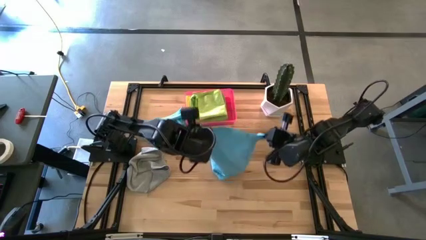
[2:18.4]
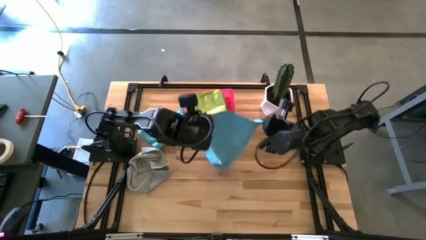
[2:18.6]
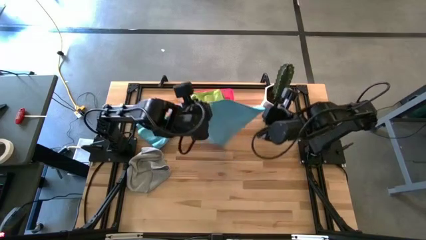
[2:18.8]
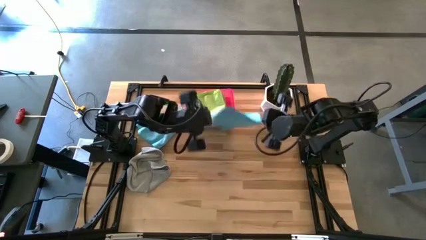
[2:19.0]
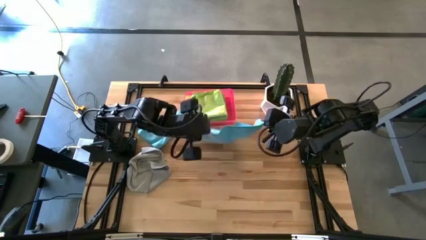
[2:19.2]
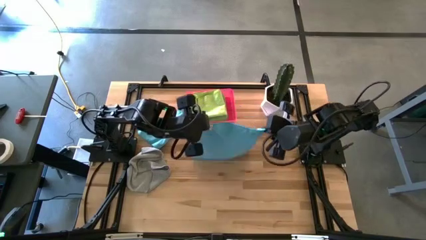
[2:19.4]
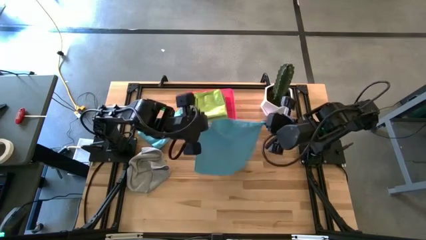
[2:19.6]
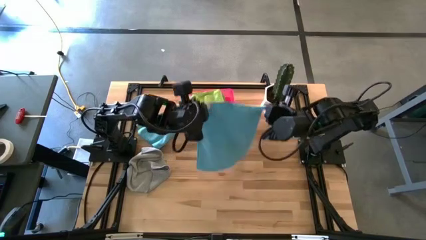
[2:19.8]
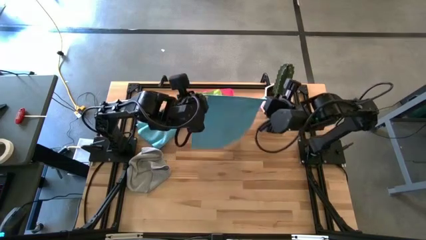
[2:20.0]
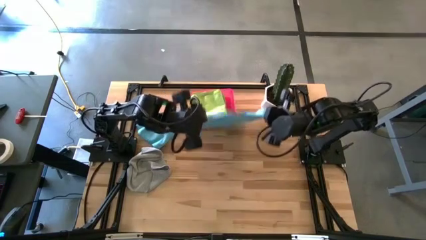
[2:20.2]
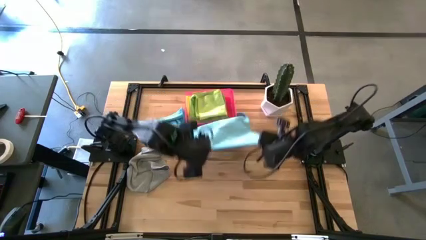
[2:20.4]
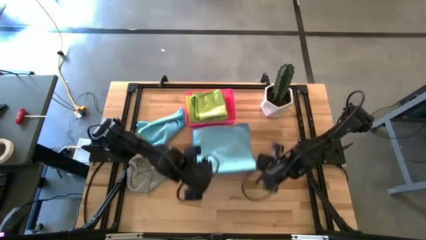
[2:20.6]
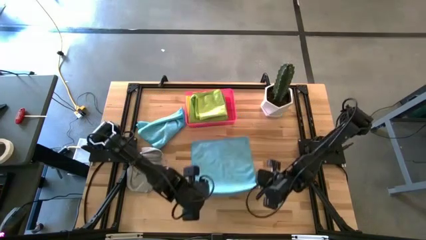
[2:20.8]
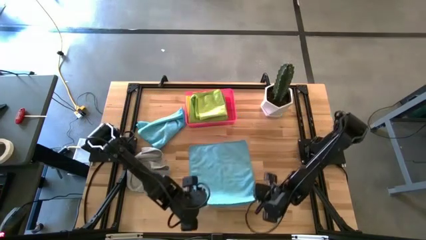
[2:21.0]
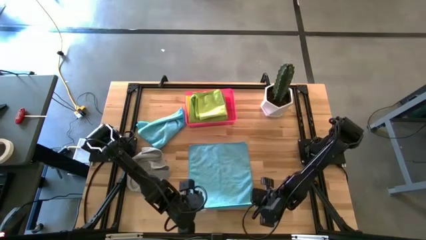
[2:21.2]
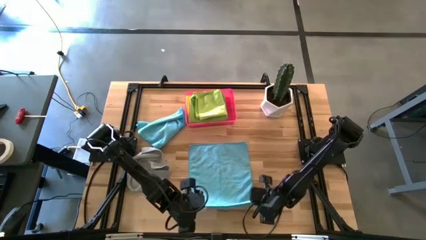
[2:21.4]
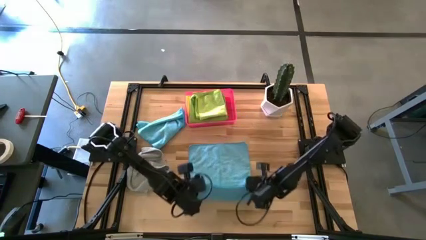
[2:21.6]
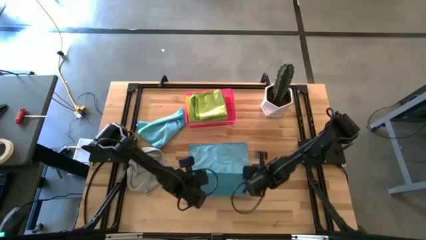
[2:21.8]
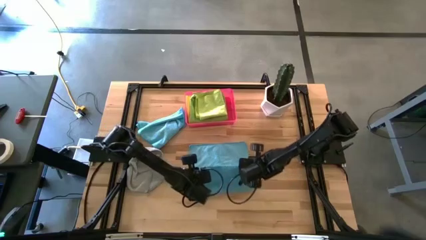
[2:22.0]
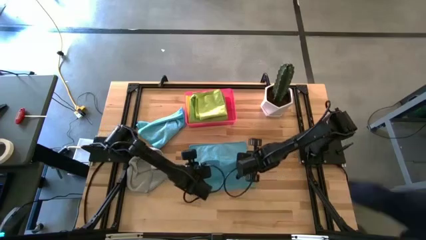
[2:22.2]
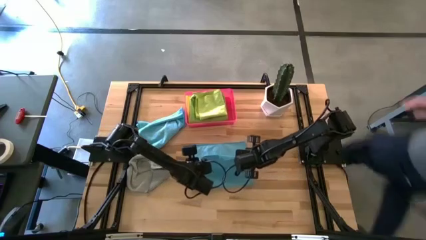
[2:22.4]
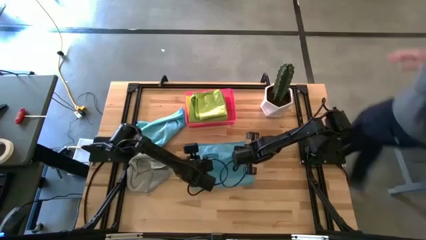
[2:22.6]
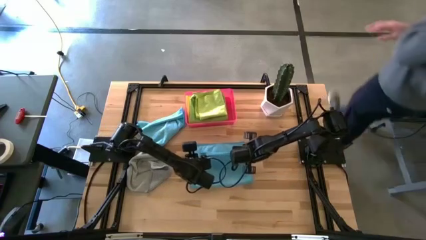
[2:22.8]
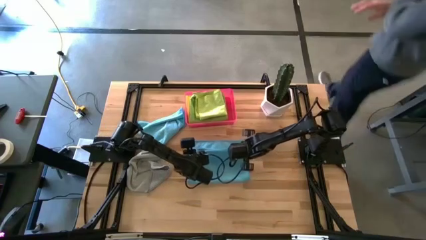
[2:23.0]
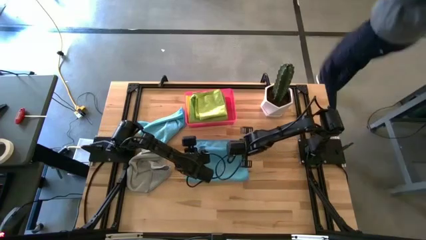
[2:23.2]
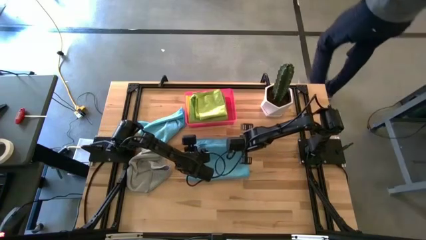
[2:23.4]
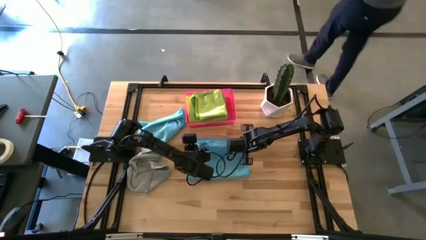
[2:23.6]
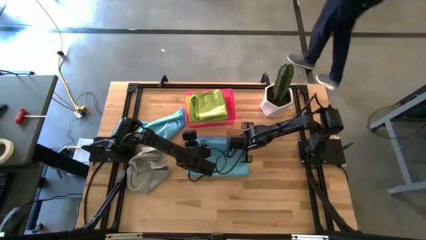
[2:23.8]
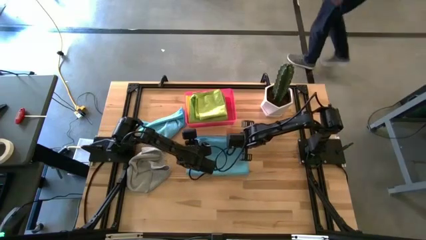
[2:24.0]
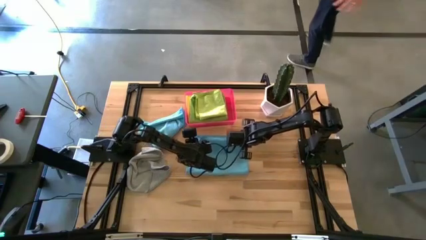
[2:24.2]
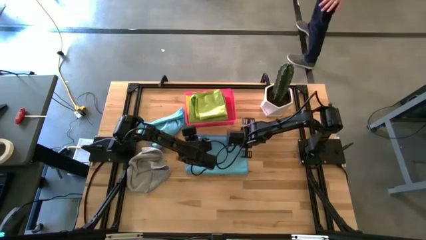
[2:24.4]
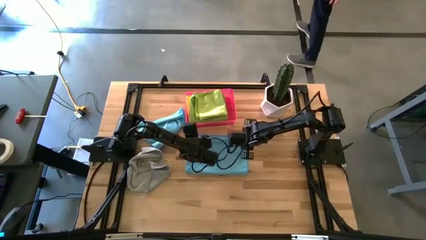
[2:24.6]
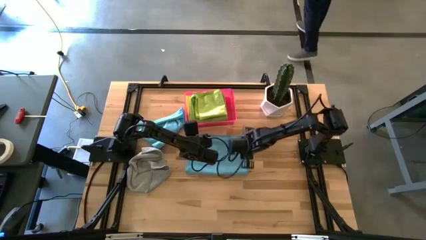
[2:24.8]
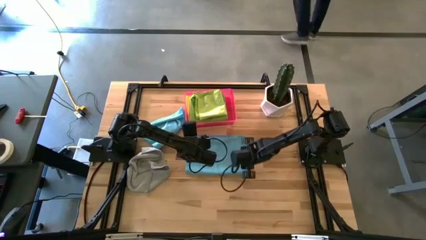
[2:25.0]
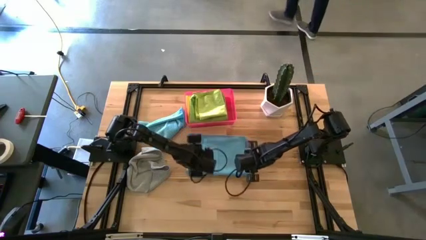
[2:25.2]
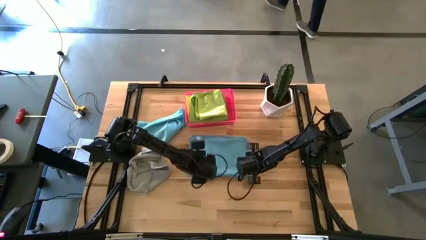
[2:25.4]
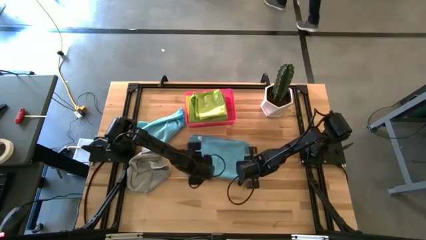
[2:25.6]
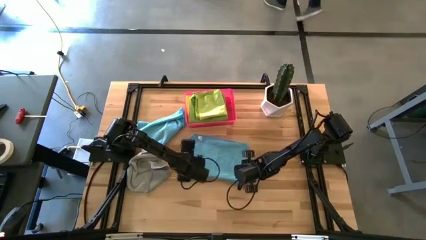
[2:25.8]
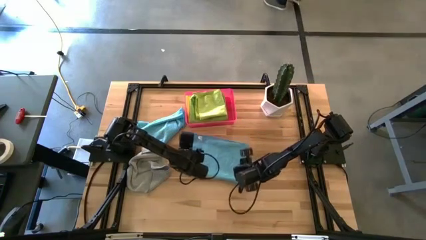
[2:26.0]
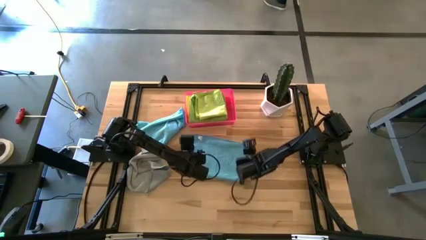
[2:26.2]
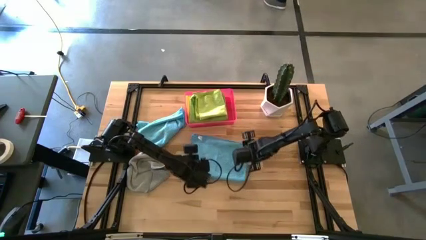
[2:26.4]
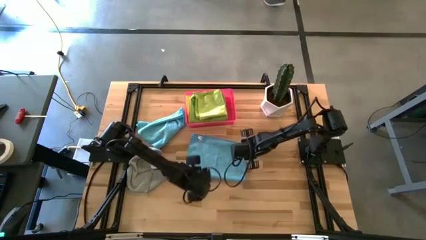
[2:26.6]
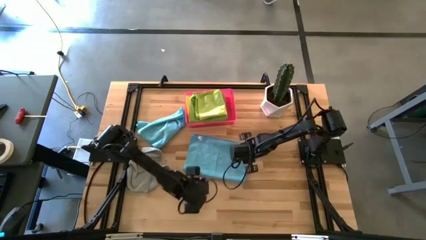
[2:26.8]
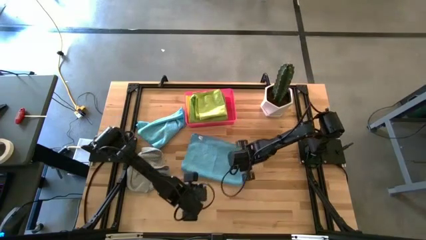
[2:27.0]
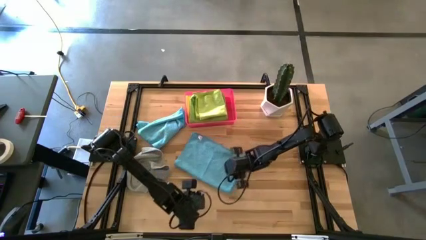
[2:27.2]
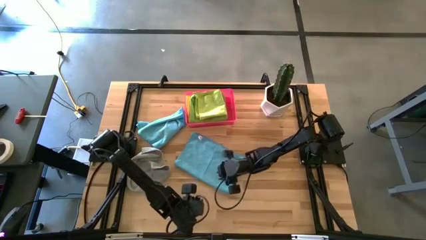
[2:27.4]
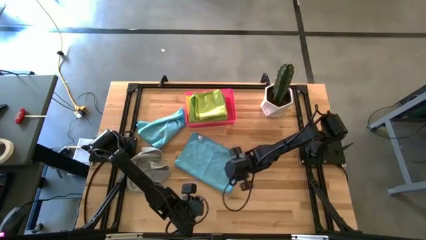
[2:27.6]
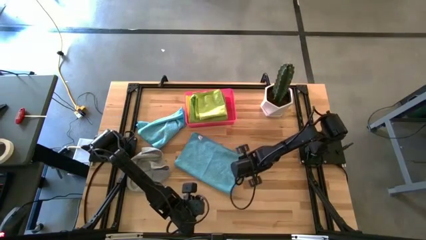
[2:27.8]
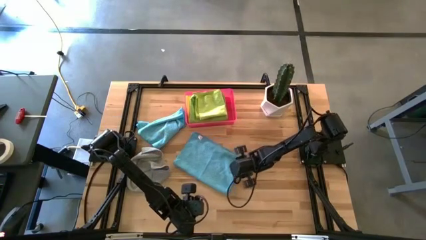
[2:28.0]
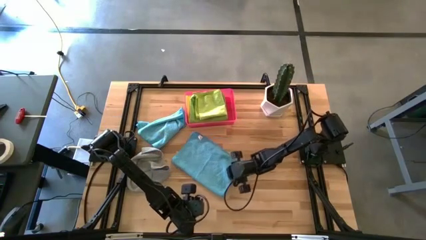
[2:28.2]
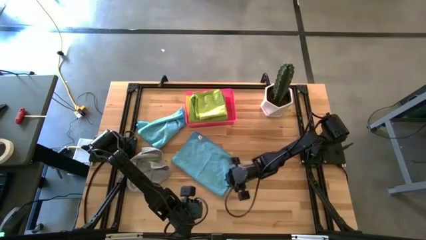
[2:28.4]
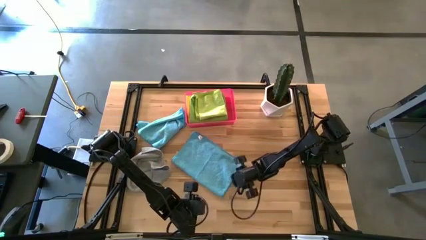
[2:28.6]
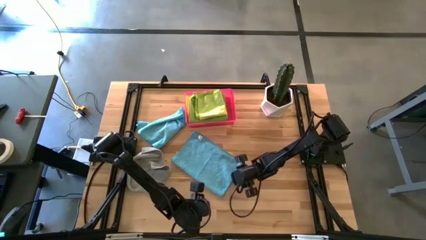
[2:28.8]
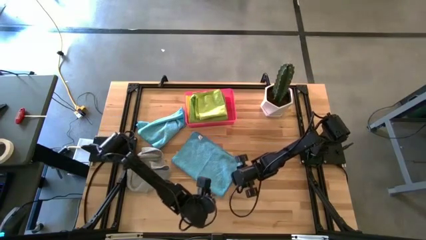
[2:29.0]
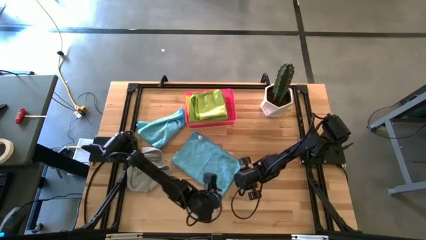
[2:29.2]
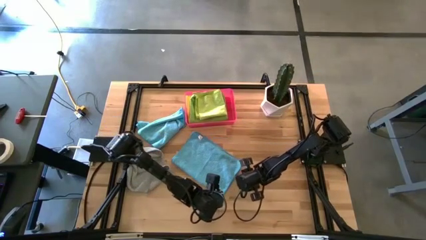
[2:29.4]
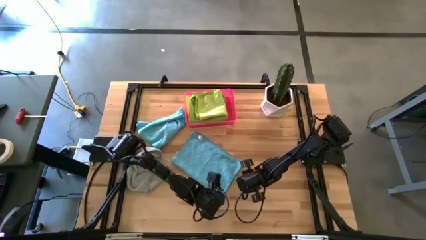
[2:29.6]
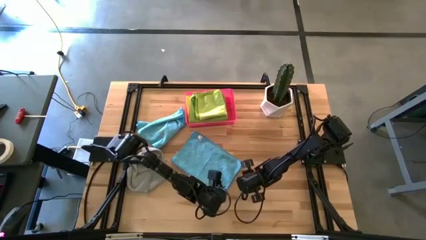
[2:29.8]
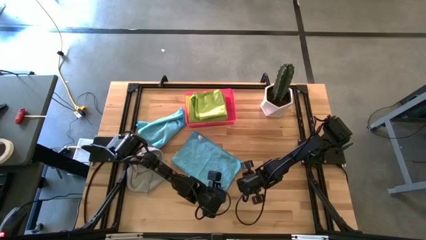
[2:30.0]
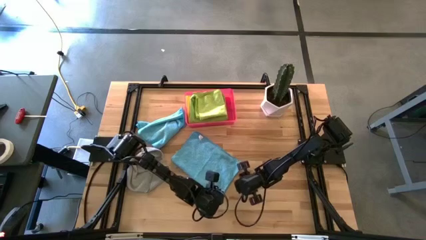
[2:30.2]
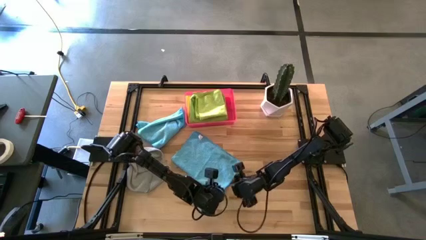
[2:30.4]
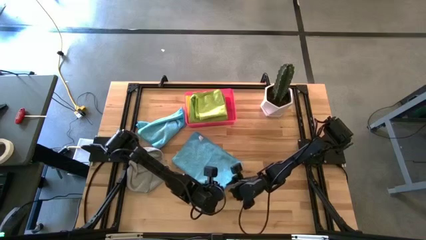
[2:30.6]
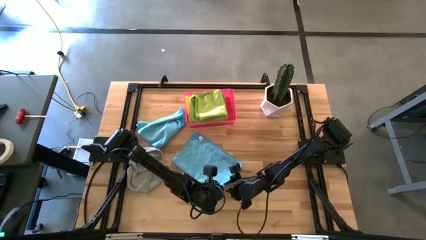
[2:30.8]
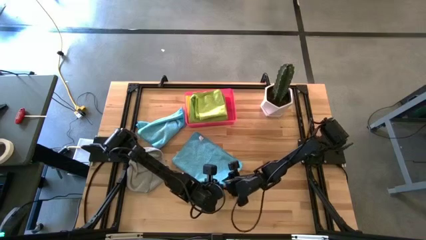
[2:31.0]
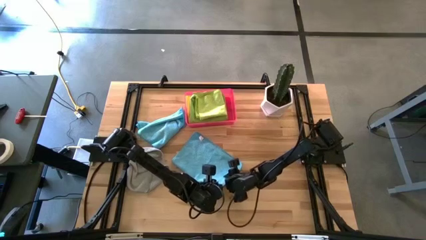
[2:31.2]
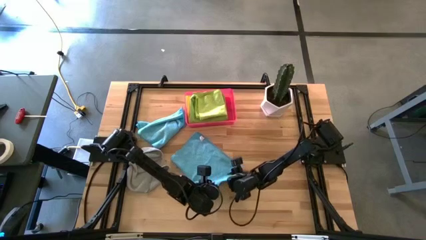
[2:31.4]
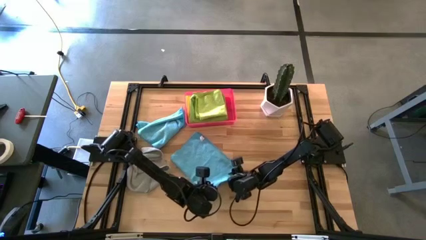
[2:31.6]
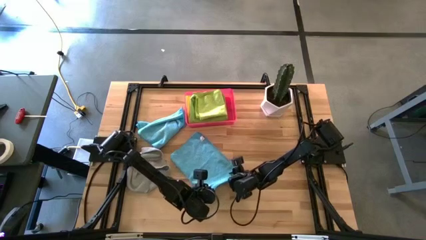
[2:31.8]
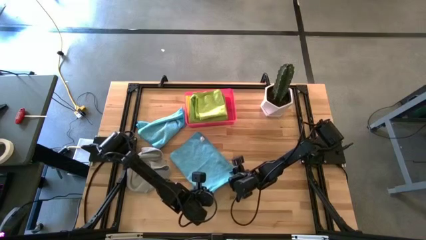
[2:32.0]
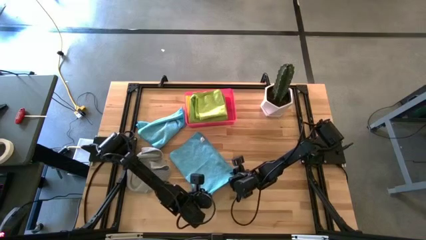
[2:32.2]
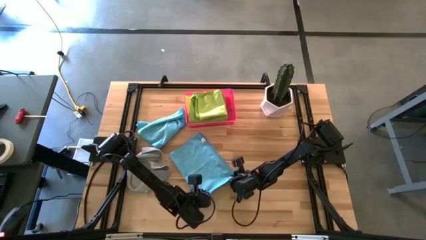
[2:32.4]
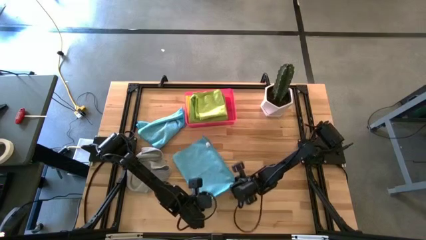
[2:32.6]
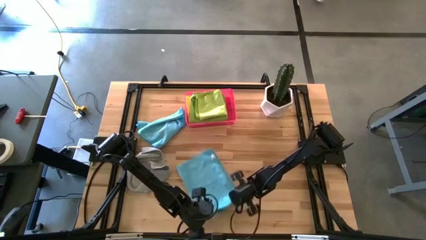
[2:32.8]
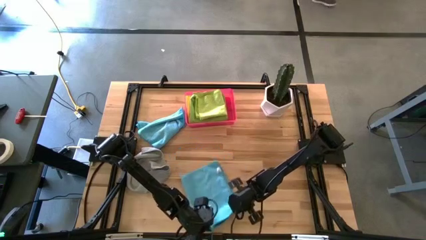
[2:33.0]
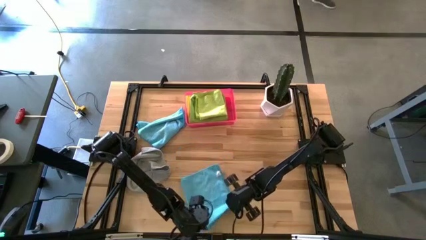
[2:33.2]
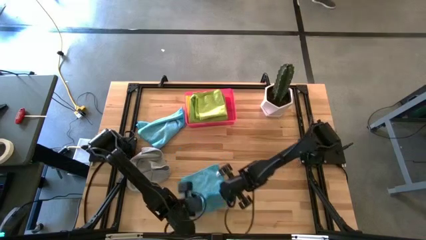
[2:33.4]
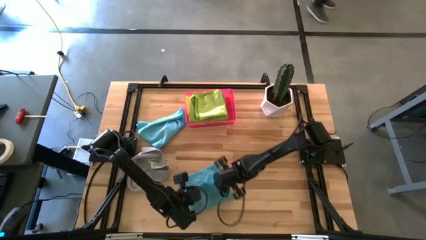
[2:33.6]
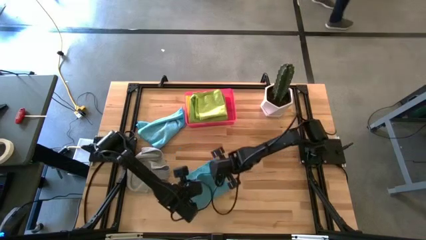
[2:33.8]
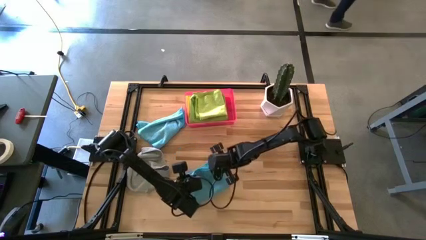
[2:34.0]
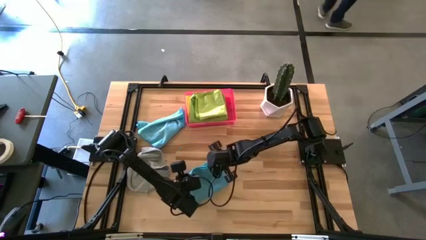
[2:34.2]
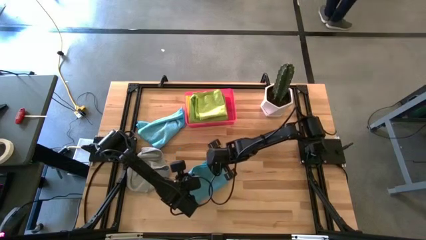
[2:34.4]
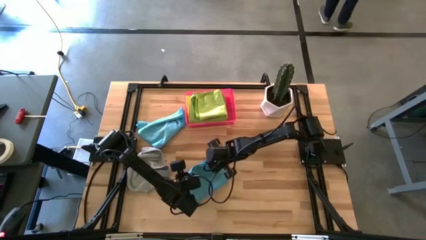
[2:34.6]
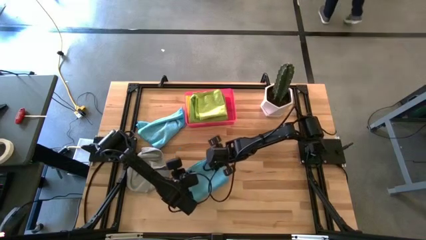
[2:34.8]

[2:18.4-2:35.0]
Task: Fold microfiber towels
Fold the bottom blue microfiber cloth
